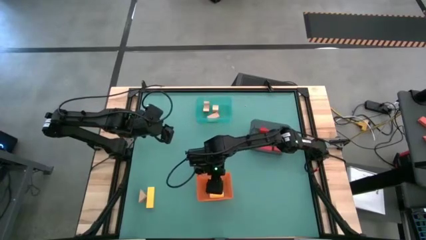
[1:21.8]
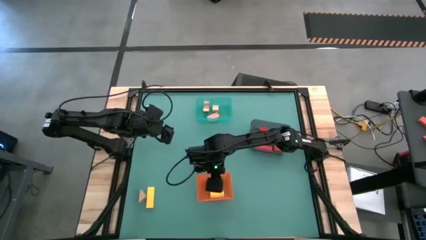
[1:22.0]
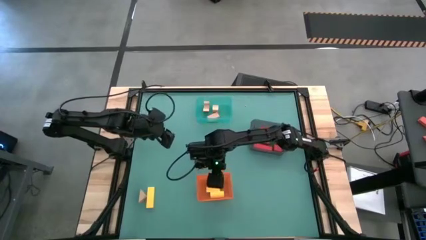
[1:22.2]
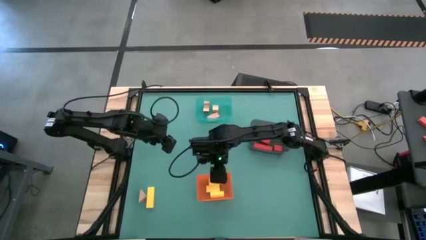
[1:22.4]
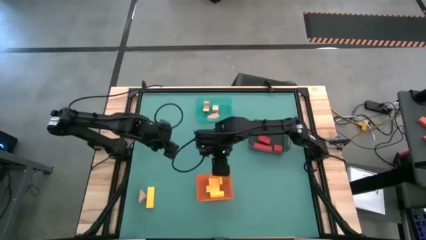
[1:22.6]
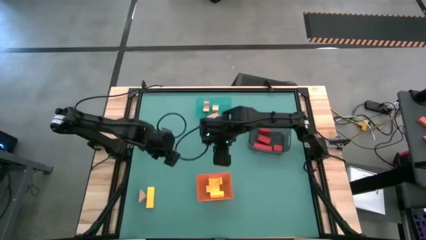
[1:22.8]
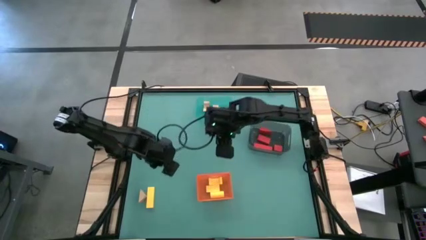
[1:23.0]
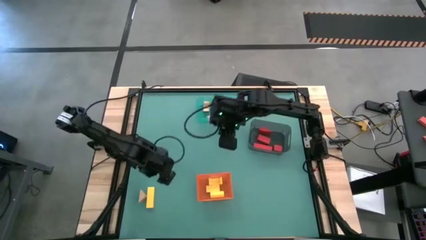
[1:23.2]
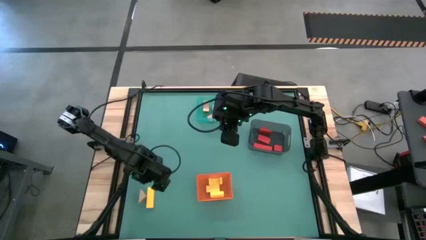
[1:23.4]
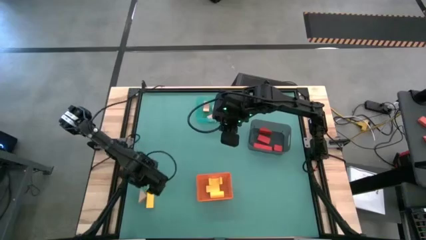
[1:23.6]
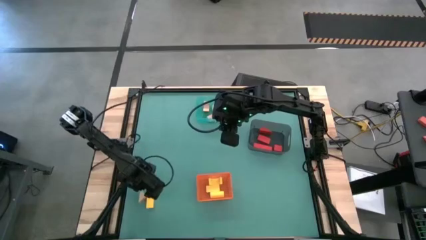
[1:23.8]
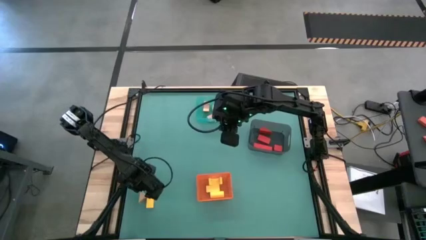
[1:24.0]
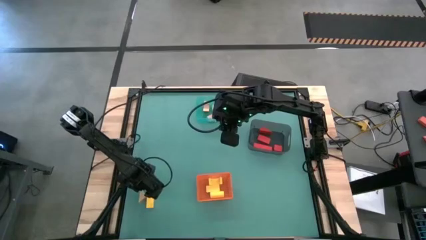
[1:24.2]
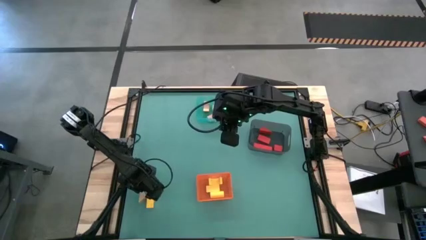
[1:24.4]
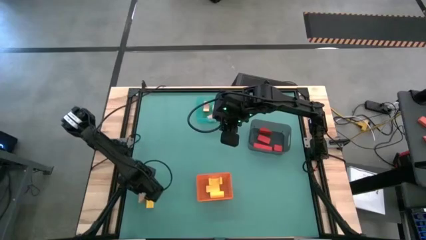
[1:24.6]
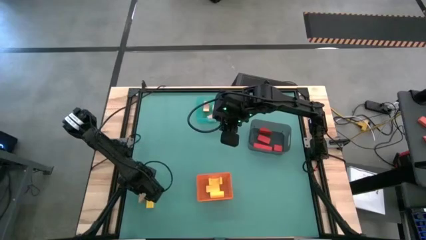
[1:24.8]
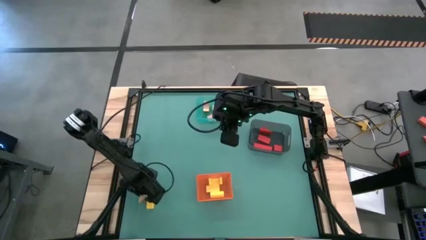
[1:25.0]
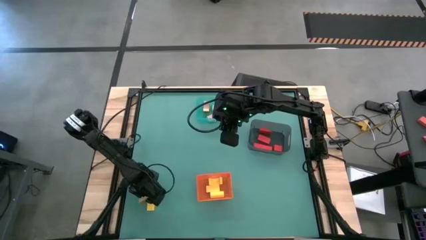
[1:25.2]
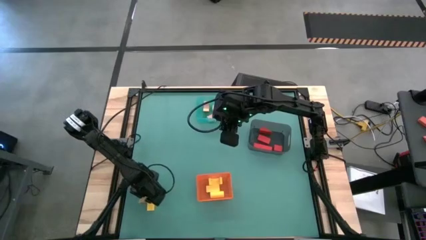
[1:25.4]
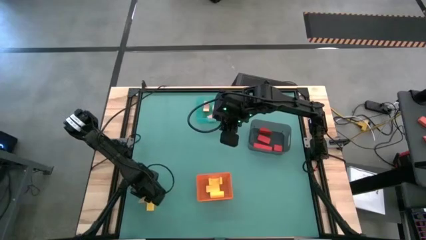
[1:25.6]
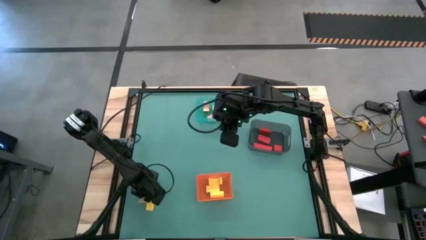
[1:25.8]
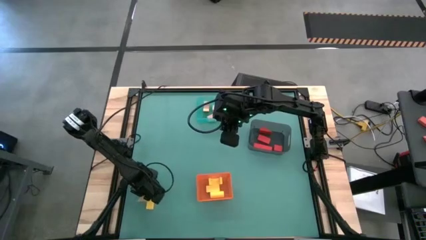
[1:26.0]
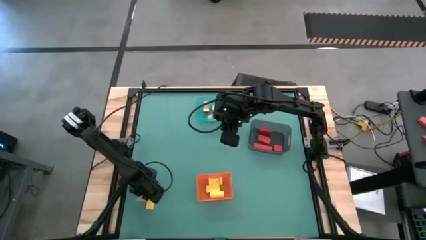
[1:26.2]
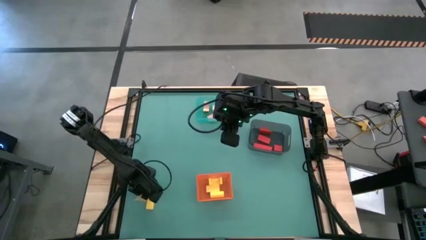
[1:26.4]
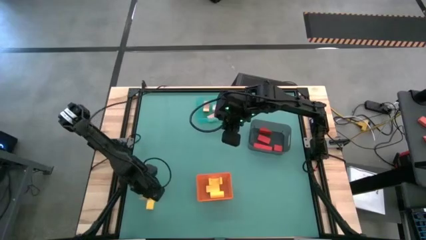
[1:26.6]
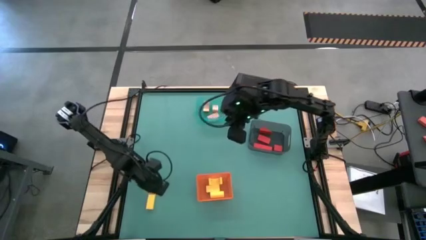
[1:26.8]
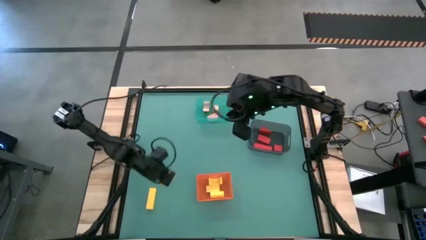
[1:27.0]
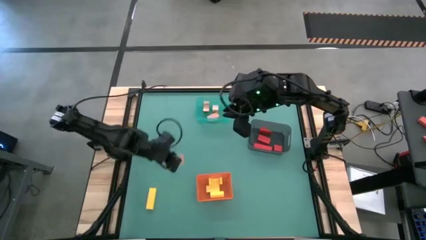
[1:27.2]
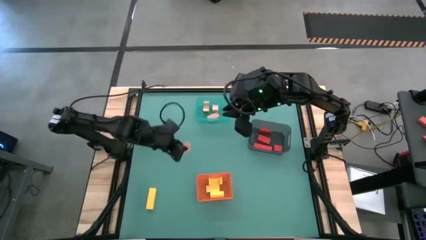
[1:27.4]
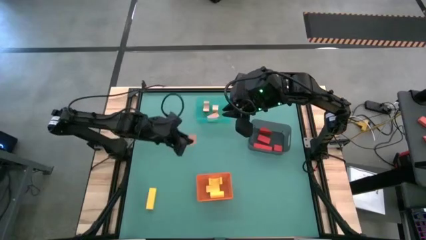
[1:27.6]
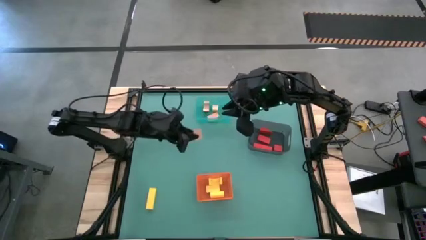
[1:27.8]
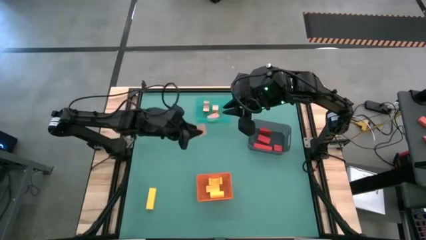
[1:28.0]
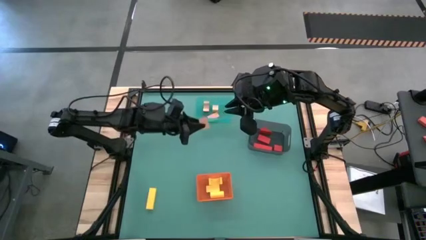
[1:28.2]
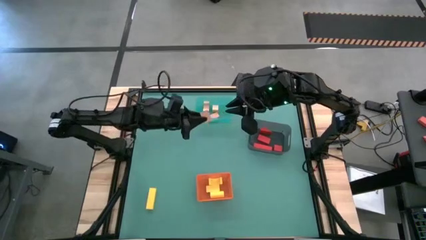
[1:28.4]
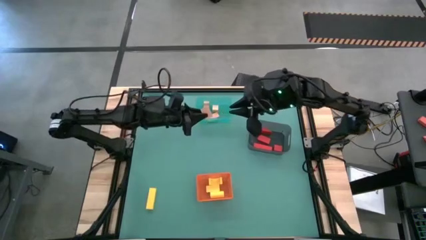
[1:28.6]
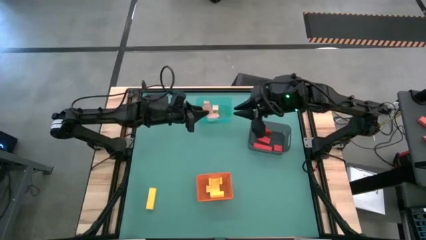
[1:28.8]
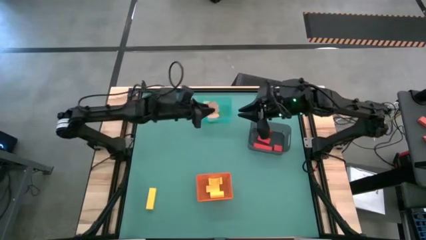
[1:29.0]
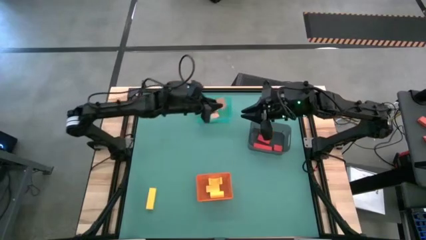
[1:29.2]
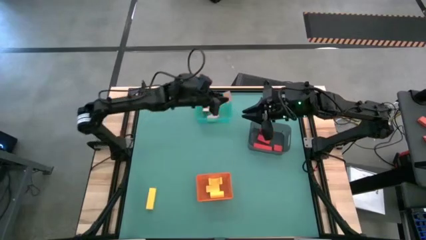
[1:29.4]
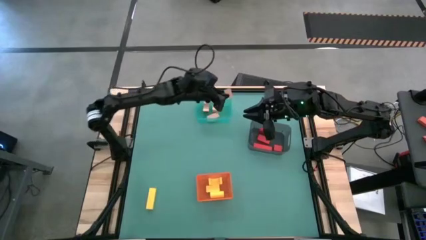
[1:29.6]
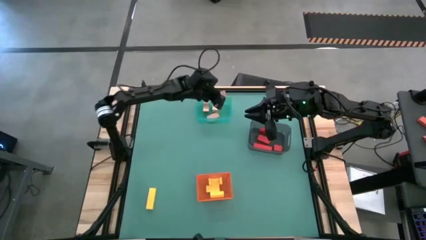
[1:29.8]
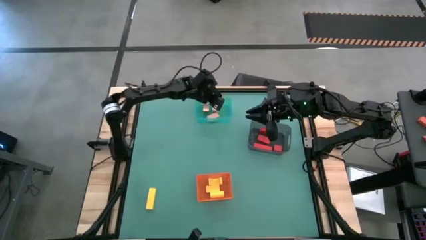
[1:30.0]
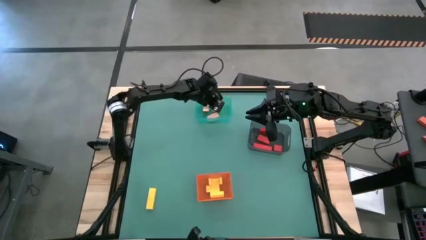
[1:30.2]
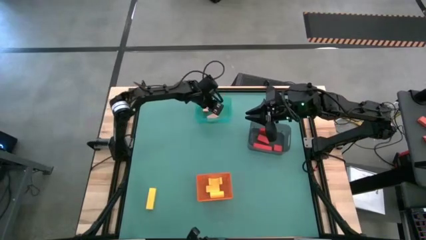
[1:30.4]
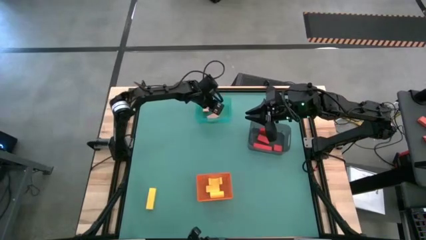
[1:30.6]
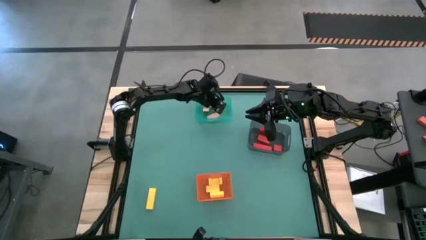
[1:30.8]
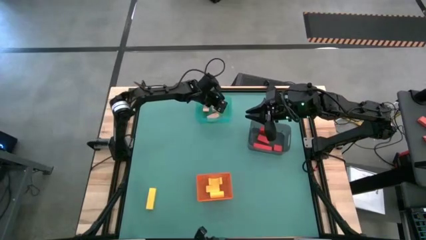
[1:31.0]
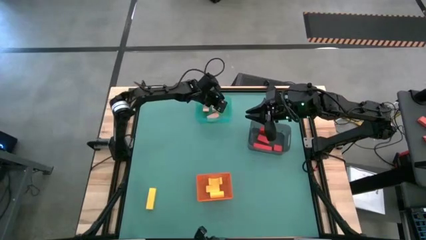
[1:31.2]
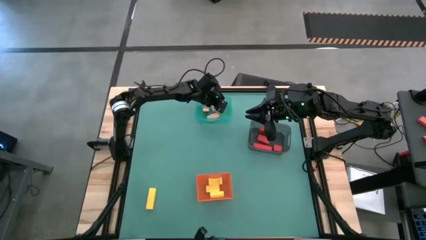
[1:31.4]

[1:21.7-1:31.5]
Task: Sort & place blocks by color
Put the brown block into the blue bin
